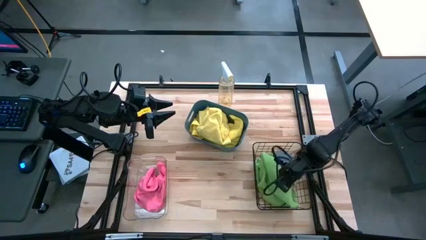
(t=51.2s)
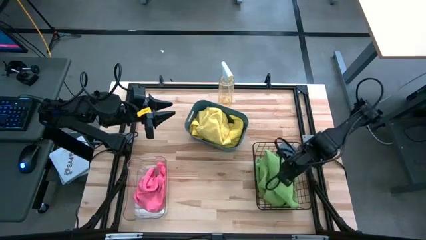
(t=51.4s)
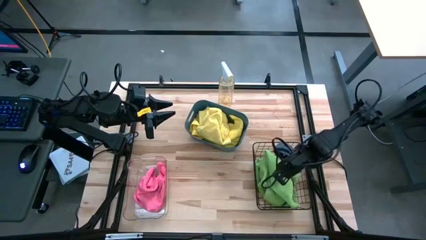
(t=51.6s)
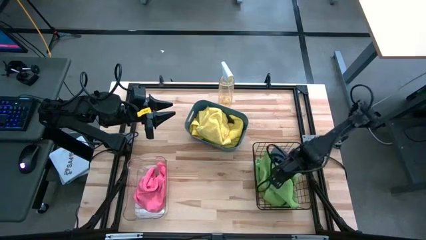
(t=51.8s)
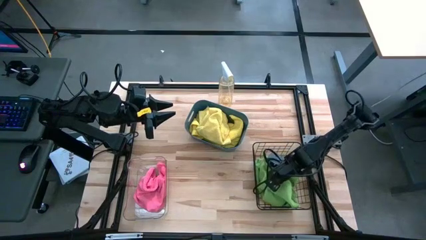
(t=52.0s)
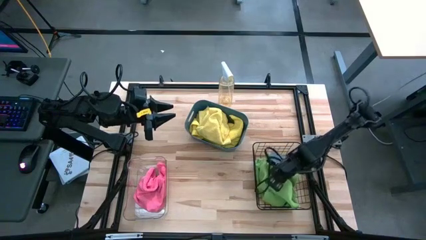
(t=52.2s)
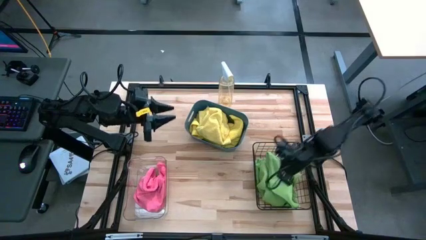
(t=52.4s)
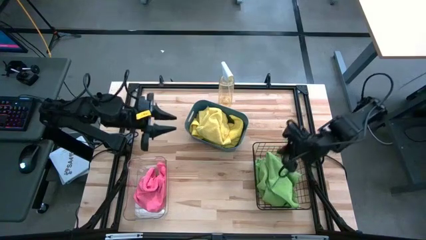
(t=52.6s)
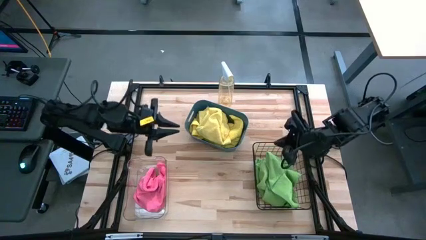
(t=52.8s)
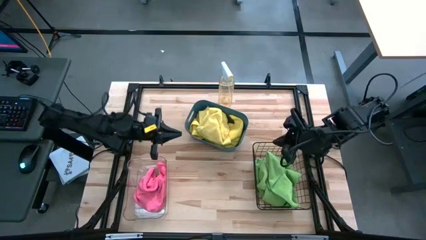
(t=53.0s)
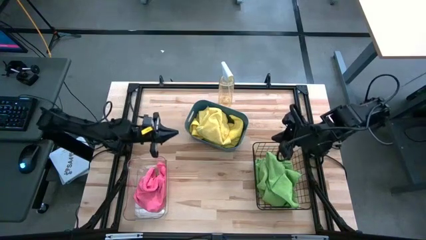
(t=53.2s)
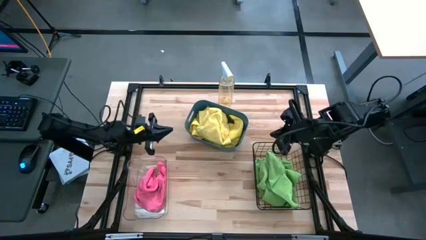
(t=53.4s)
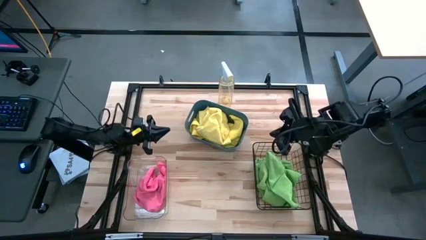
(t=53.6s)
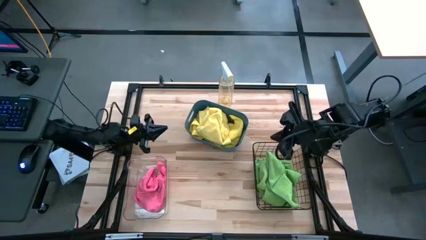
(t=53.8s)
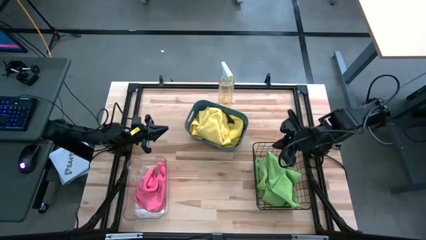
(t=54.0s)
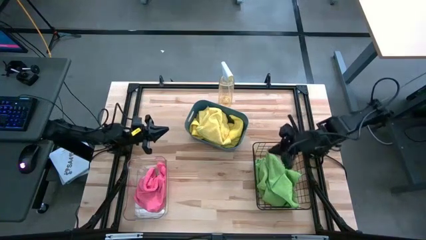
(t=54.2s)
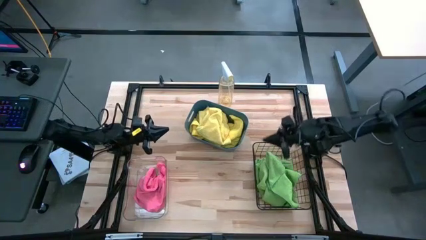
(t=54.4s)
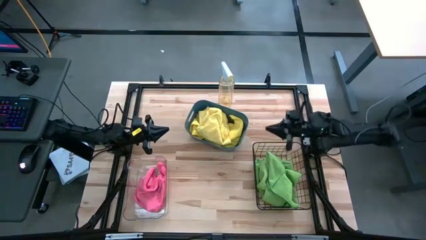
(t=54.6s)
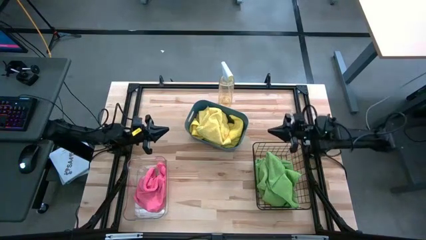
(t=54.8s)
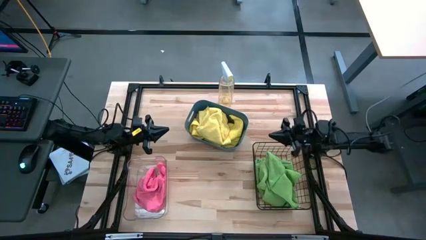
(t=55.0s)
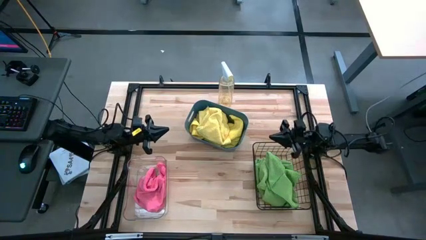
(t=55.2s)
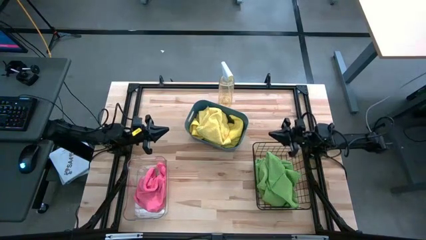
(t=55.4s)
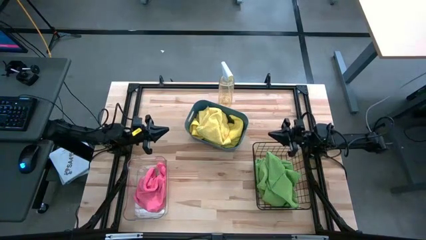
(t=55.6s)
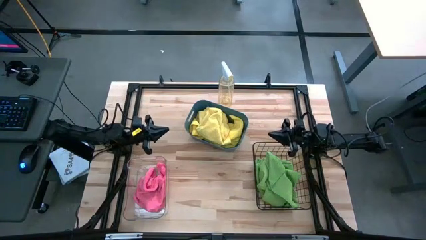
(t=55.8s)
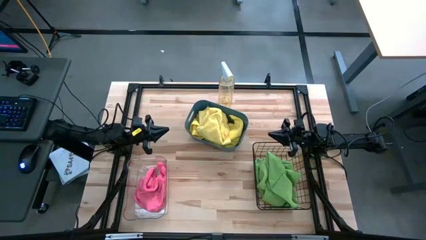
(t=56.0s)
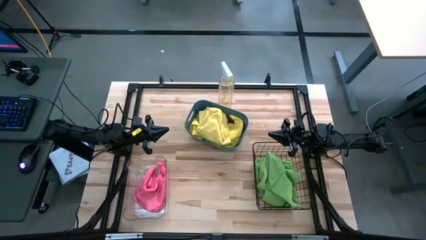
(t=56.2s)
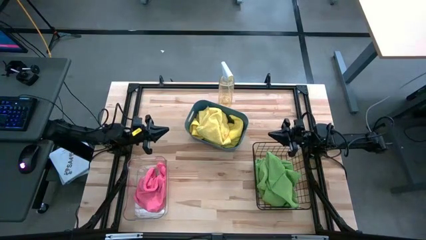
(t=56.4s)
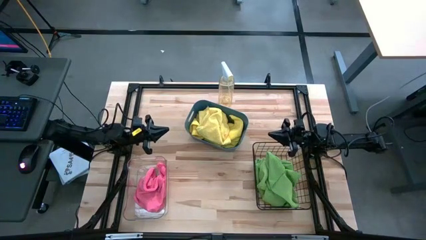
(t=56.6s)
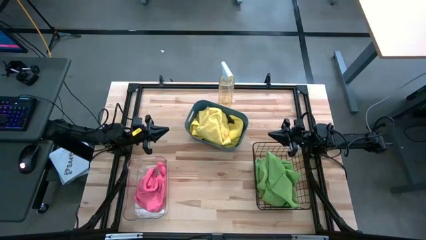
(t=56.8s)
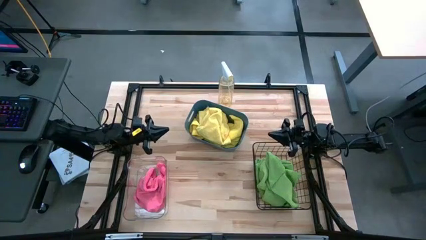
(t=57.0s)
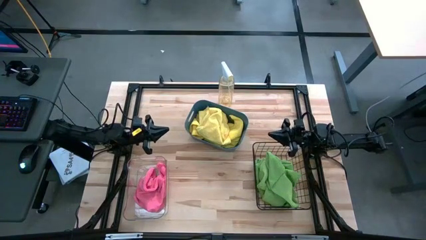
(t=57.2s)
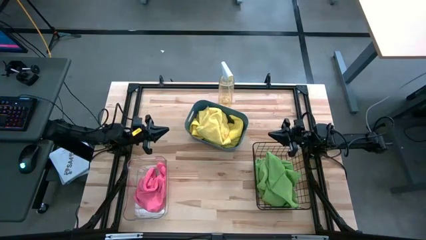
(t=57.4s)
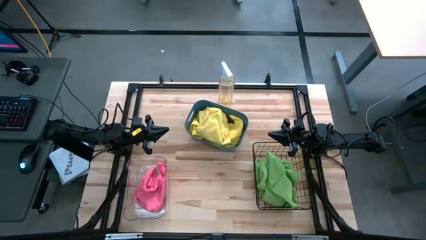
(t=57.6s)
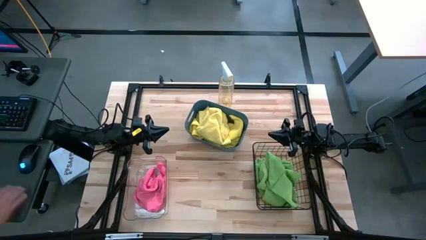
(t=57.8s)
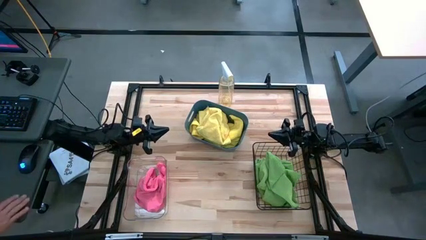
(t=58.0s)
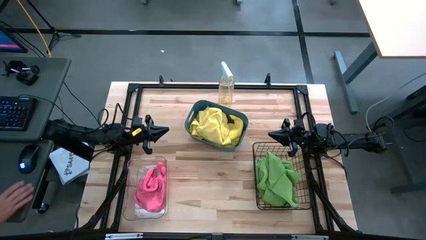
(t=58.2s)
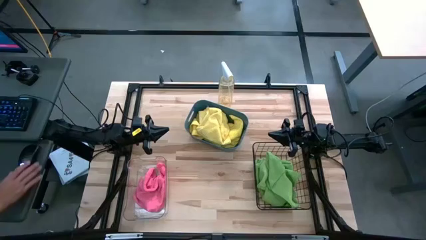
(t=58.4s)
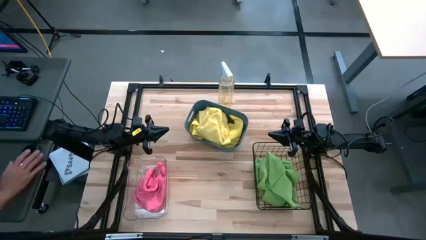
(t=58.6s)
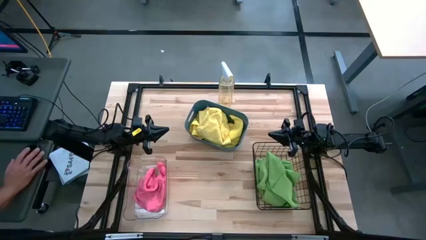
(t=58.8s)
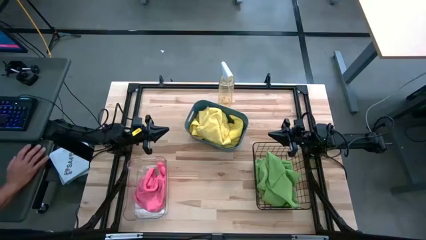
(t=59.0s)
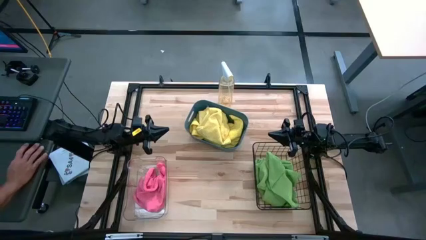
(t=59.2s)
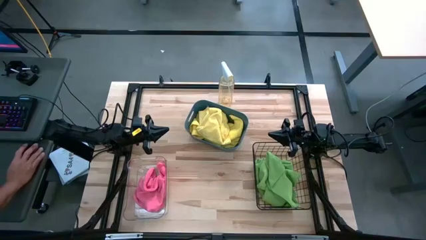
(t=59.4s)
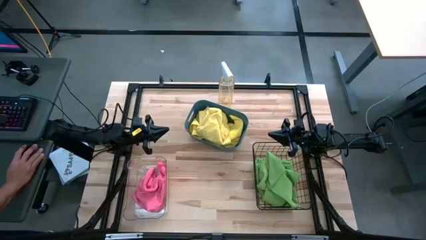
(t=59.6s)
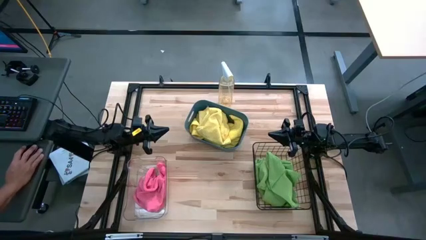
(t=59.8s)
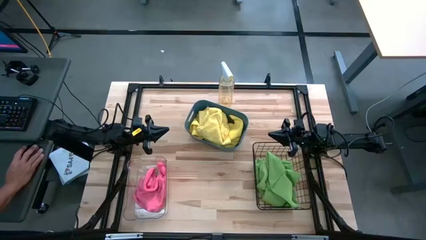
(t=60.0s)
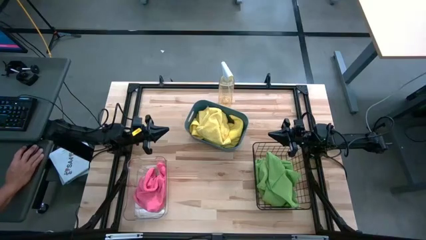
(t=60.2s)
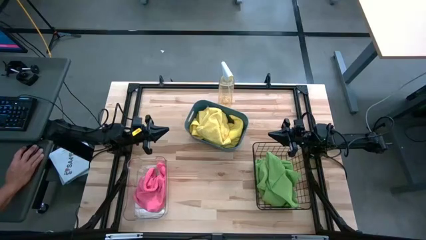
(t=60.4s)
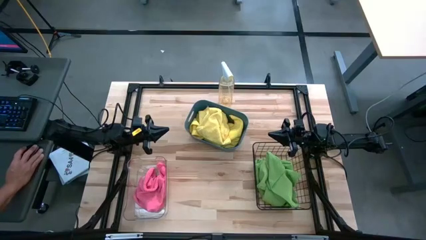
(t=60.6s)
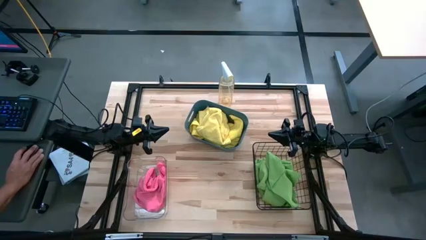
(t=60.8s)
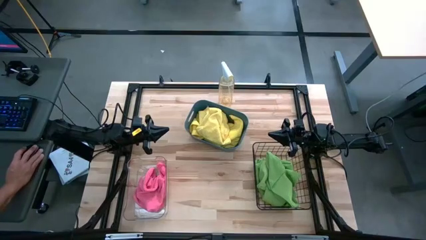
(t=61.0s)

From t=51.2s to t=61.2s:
Task: Sort microfiber towel by color & place in baskets
Return to Home Position

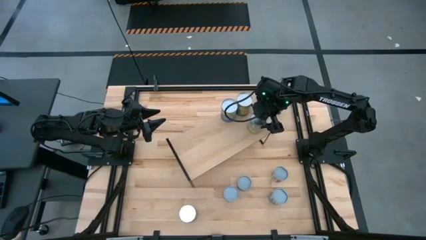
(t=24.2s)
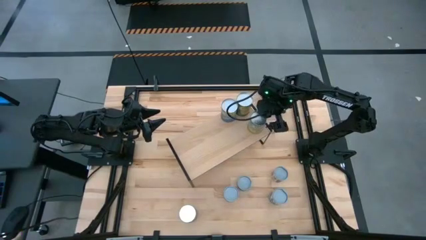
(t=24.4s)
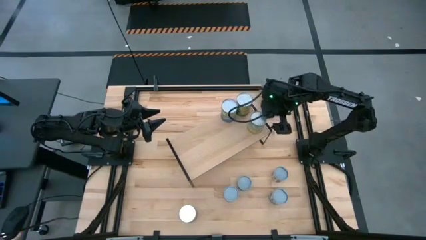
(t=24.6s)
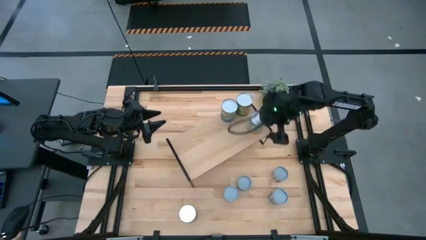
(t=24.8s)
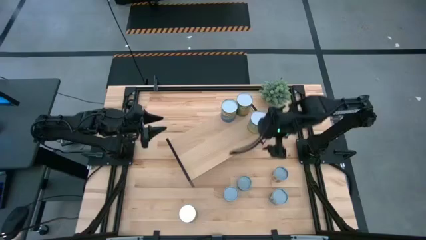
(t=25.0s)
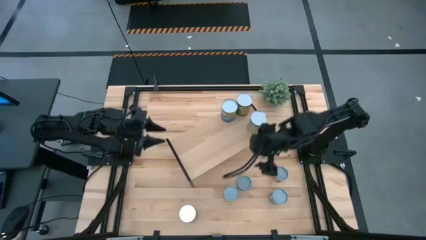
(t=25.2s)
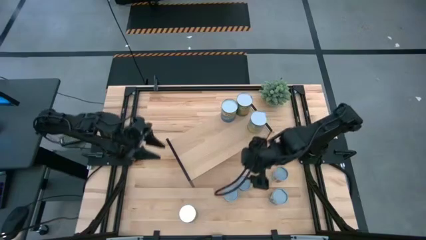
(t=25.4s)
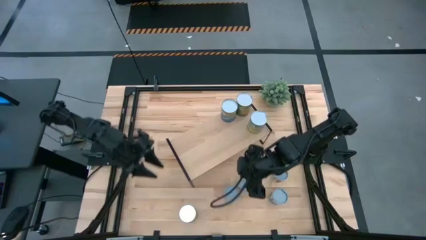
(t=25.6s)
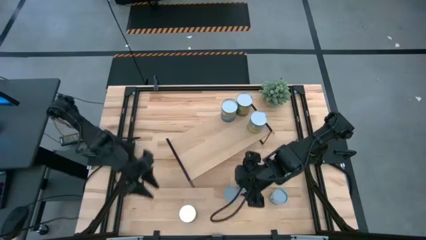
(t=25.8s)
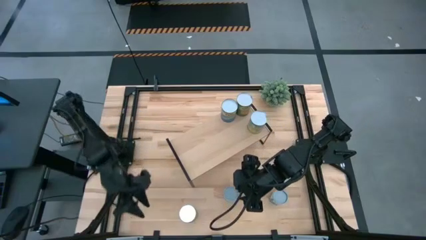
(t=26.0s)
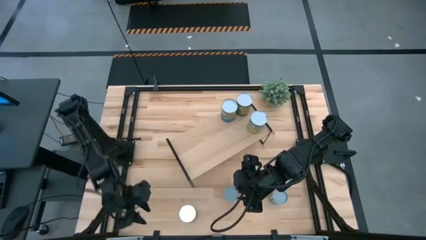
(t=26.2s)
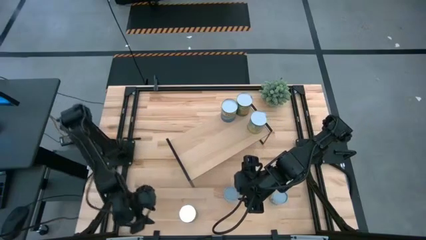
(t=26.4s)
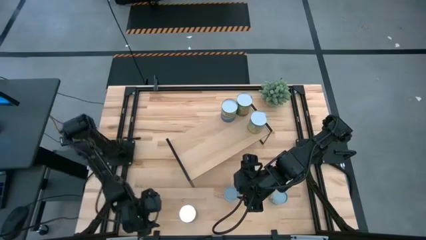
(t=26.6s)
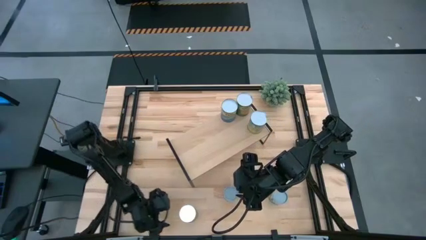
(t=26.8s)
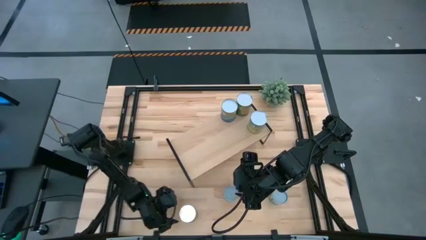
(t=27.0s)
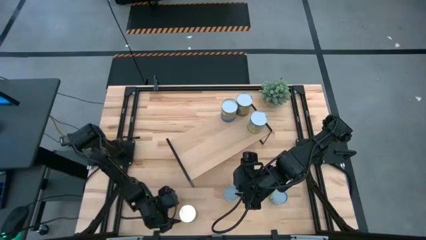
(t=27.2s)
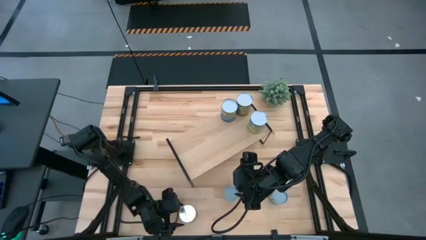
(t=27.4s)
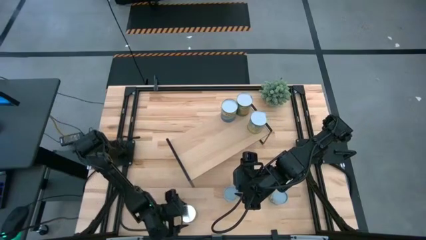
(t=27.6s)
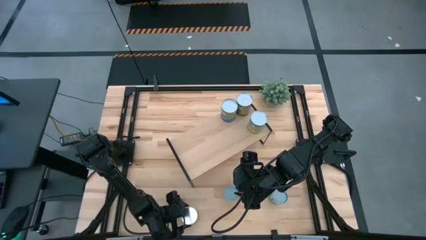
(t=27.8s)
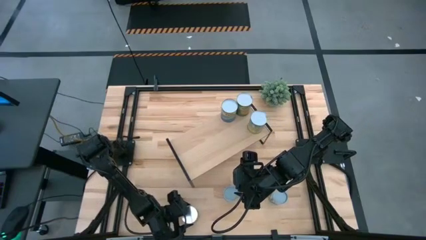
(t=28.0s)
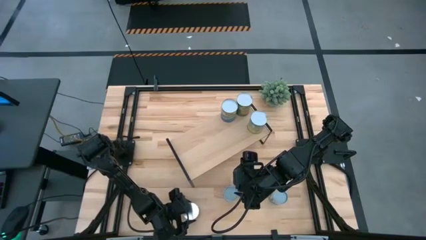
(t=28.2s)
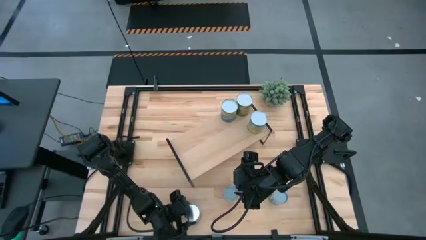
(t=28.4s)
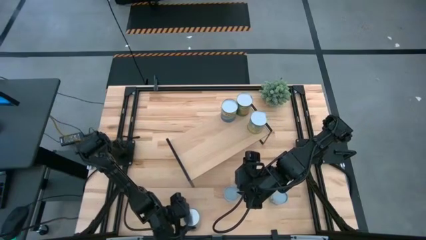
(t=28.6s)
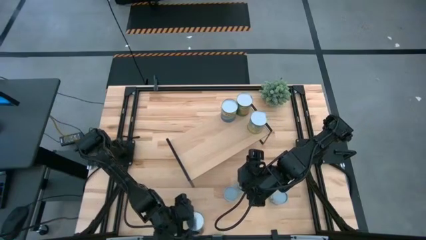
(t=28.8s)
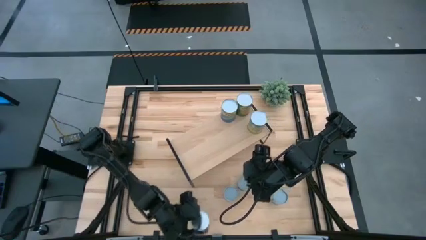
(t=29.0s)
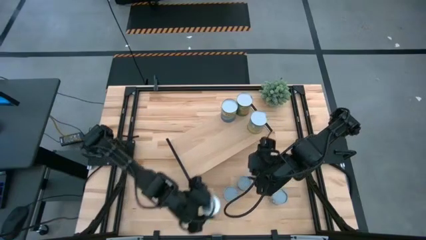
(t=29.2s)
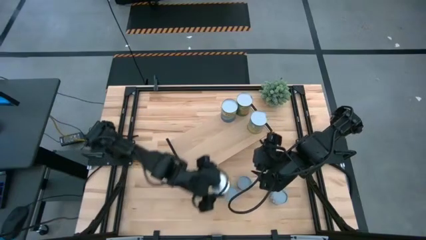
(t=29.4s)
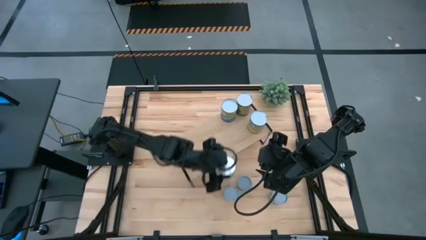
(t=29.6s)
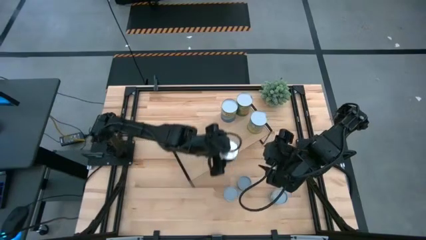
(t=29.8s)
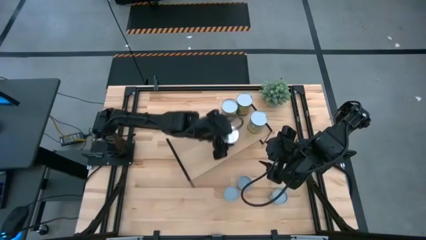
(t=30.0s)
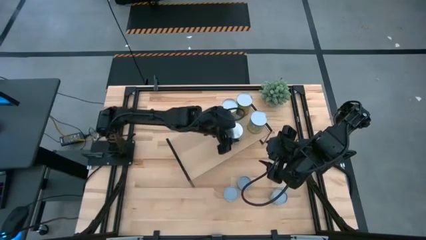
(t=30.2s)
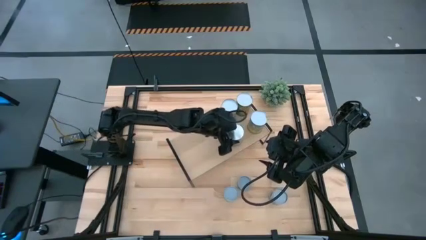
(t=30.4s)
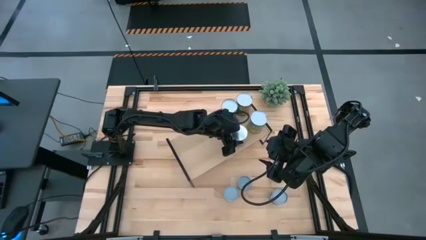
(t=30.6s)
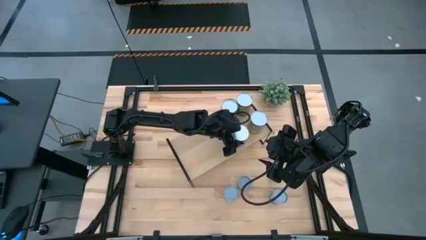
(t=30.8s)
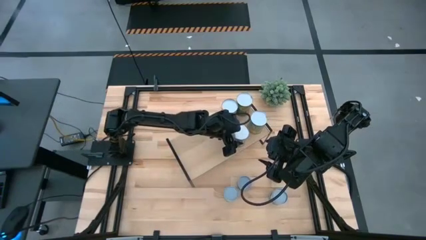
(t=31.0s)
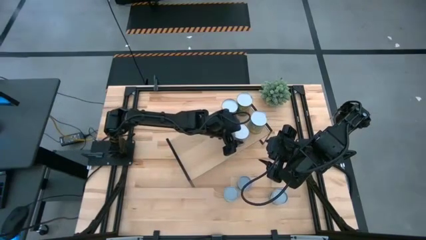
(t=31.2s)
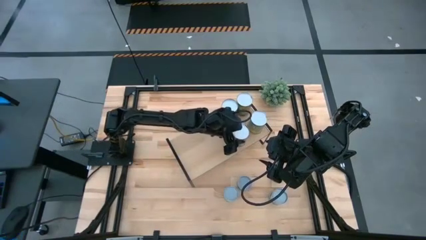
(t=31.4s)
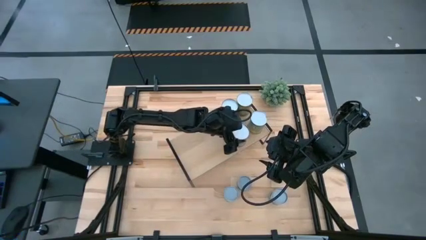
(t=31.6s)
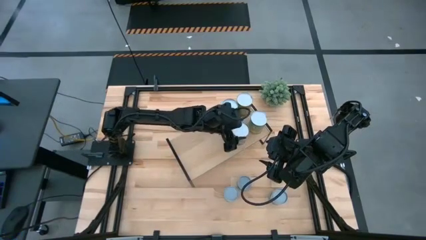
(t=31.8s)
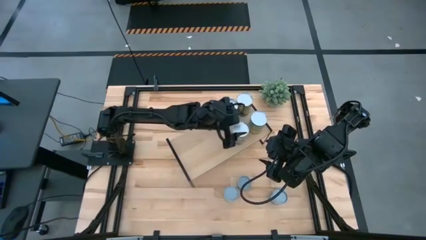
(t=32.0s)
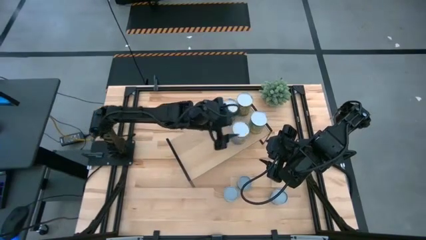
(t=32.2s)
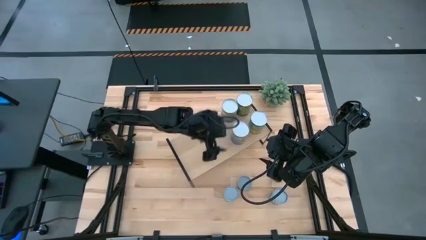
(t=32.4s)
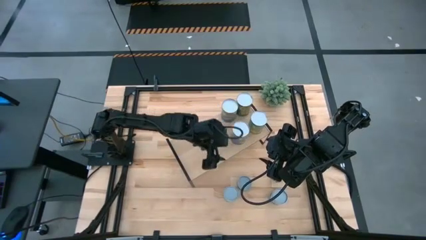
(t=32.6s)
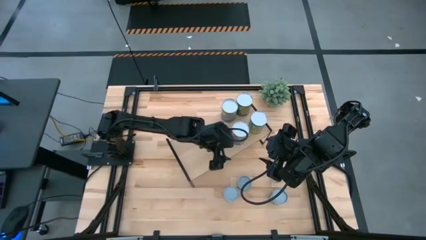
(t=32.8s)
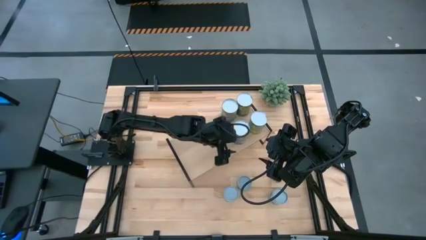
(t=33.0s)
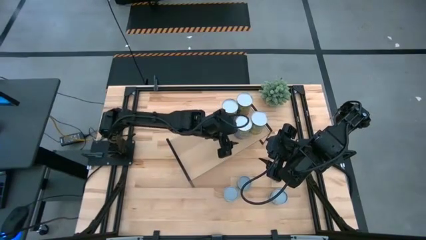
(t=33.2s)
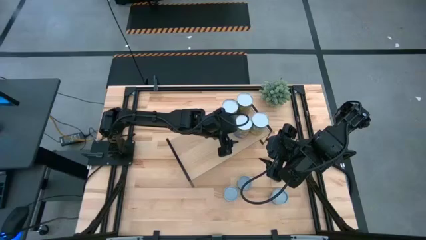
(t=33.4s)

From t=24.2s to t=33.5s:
Task: Pick and place cans onto a shelf
Put the big canned peaches on the shelf aligned with the other big canned carrots
